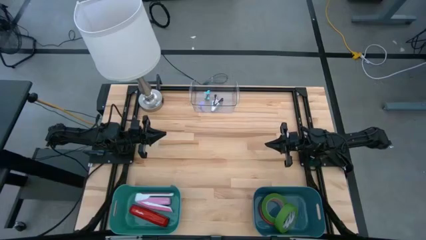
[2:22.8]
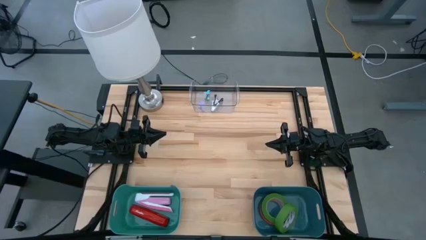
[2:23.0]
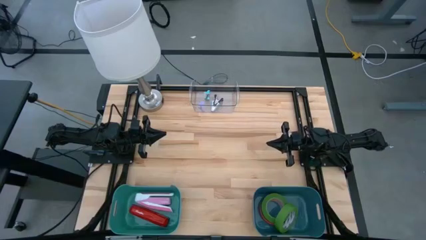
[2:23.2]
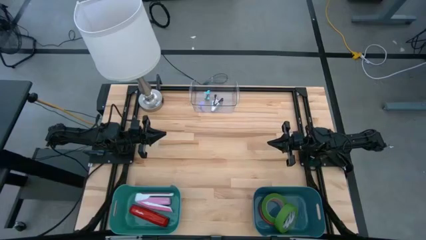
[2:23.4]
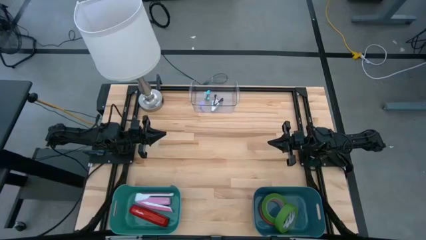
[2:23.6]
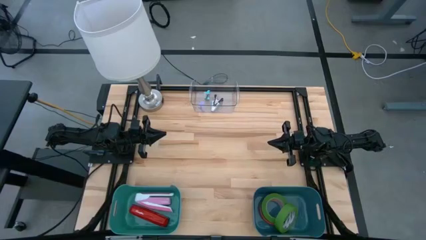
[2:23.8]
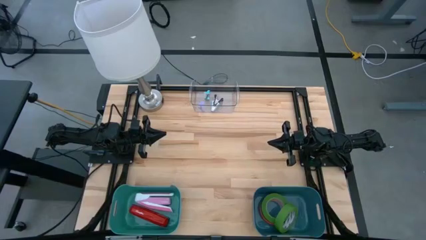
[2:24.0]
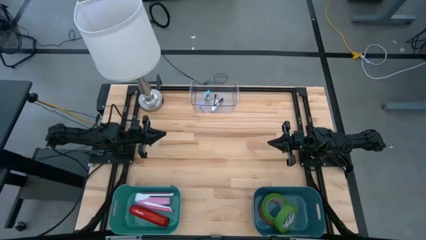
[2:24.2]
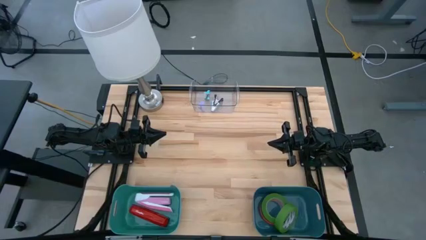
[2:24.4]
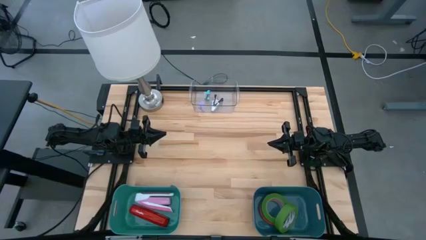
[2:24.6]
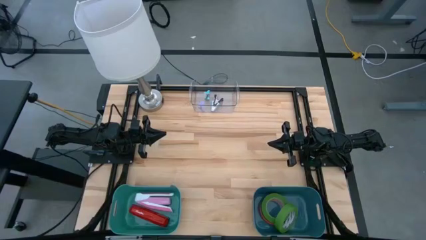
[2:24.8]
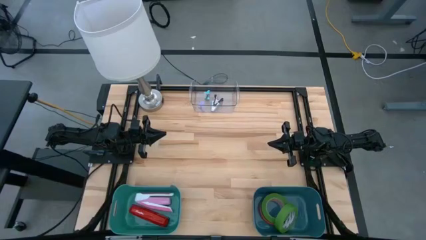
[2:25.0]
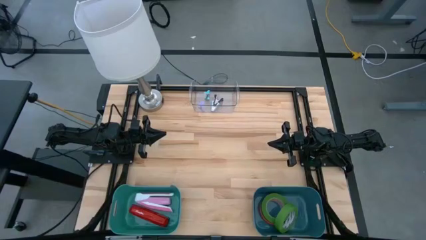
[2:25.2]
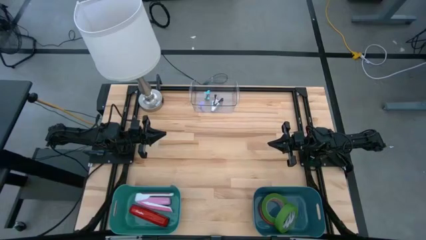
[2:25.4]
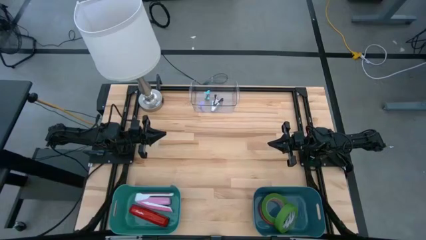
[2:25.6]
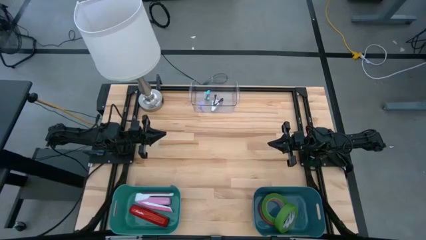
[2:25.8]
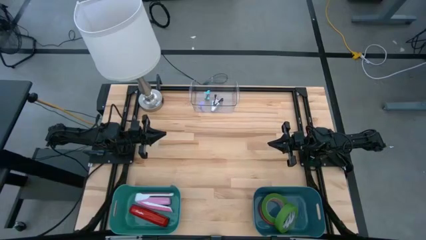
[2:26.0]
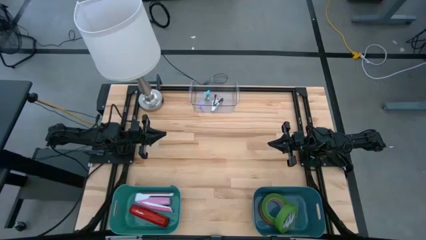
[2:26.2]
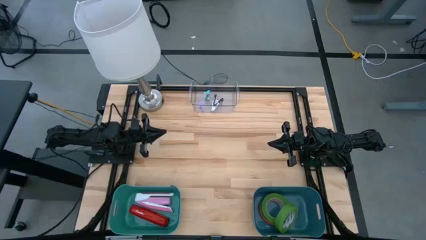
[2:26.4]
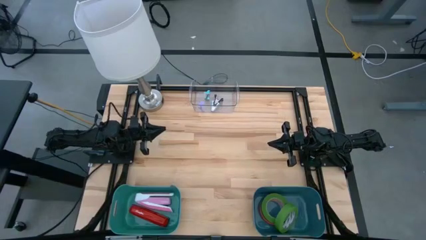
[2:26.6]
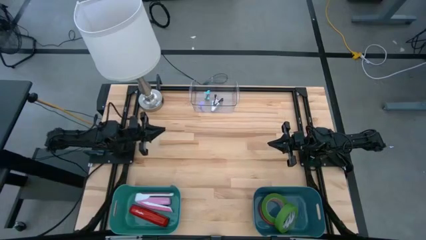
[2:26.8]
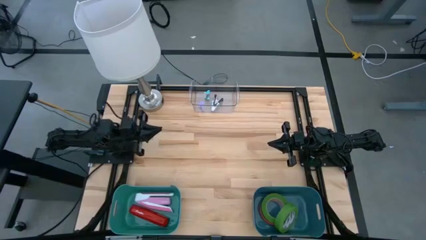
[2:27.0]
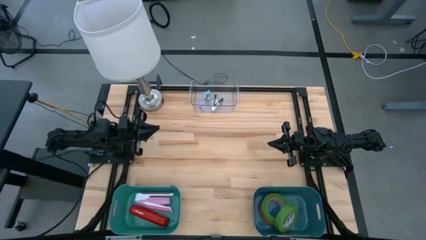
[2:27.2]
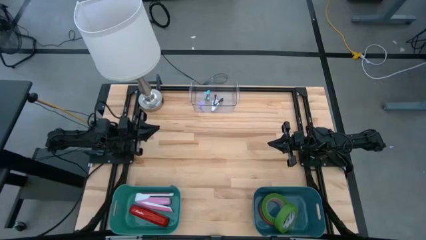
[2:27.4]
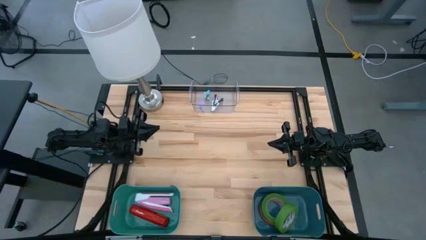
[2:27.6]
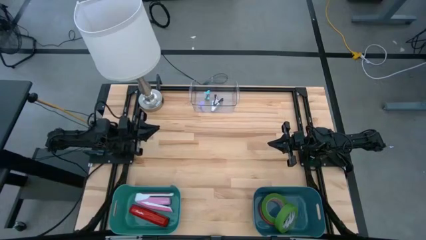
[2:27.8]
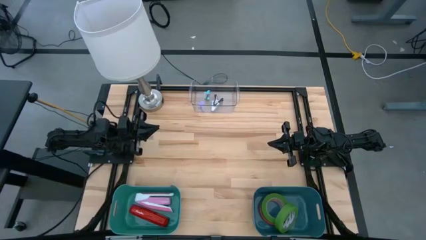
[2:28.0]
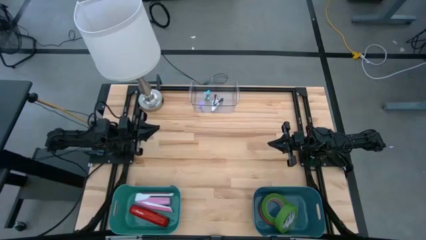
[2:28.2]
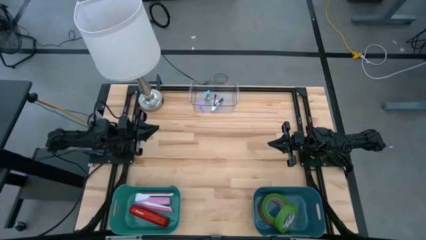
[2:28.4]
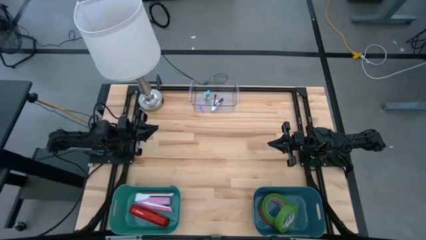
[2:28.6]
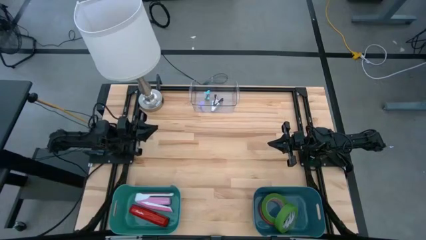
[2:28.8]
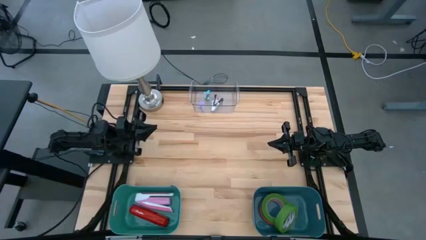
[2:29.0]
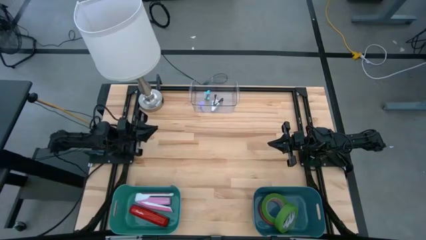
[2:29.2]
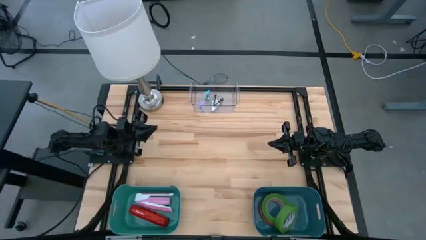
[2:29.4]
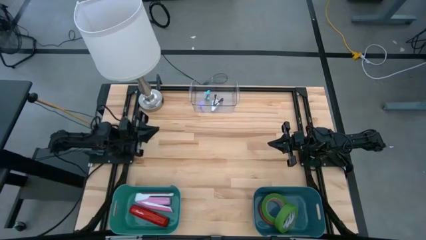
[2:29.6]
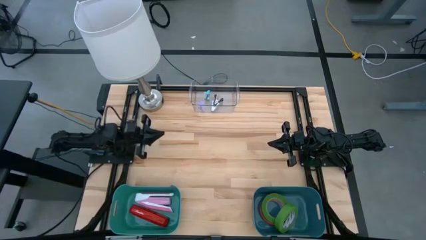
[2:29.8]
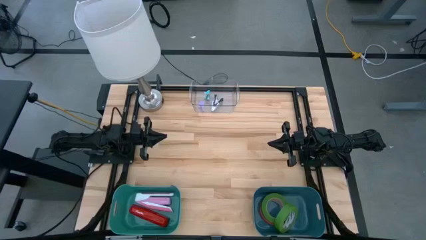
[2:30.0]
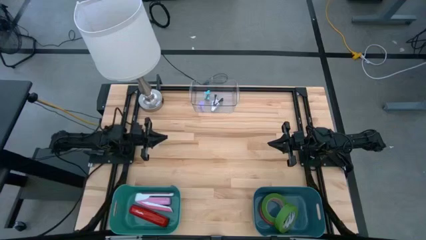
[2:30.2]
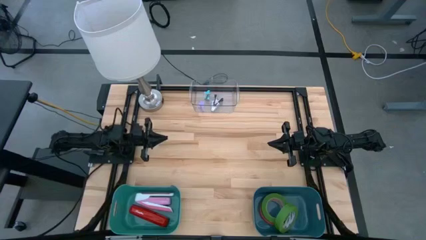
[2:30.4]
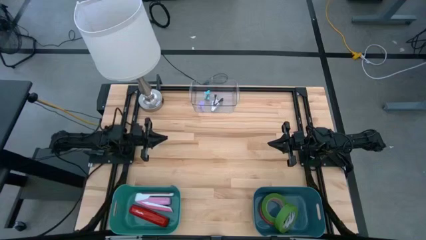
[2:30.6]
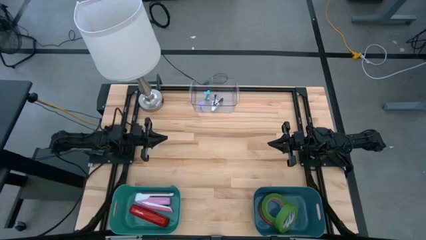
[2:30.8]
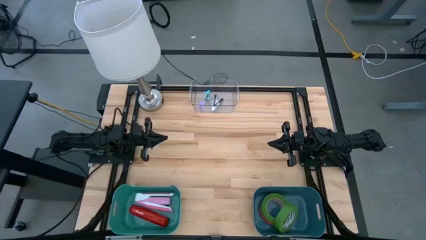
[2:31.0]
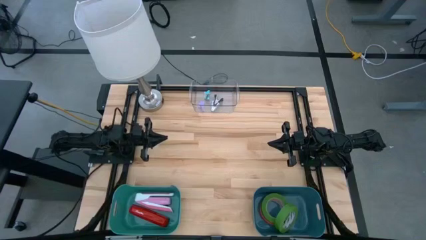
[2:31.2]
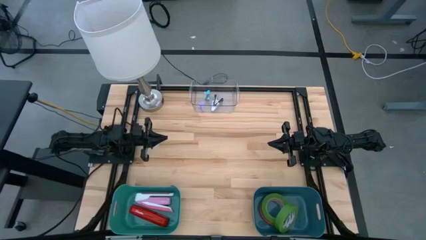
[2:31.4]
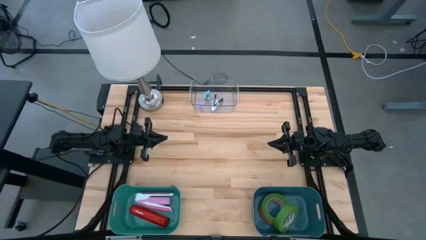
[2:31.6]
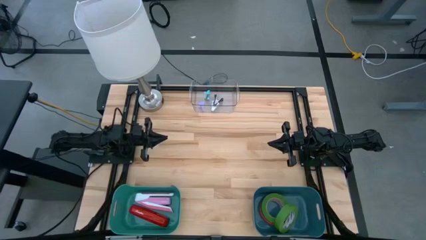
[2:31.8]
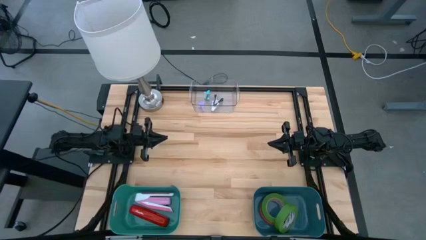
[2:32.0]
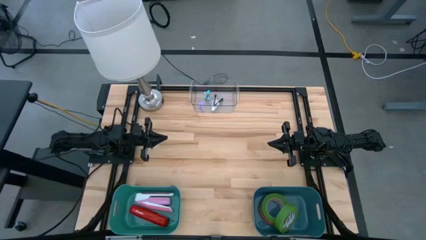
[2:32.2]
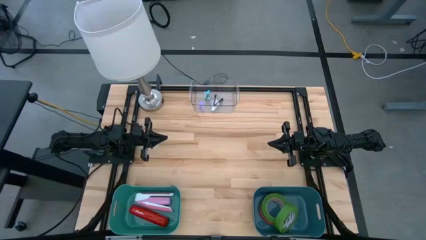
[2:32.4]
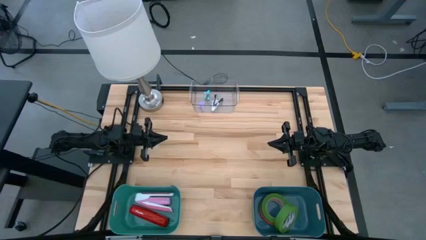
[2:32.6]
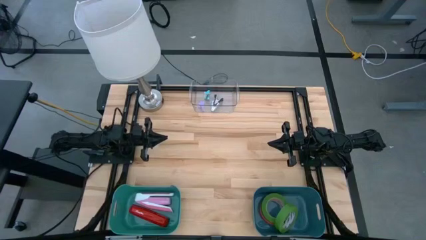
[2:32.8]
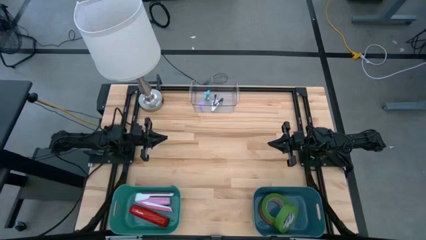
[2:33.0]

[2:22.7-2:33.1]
Task: Pick and place Stapler, Stapler remover, tape
Return to Home Position
